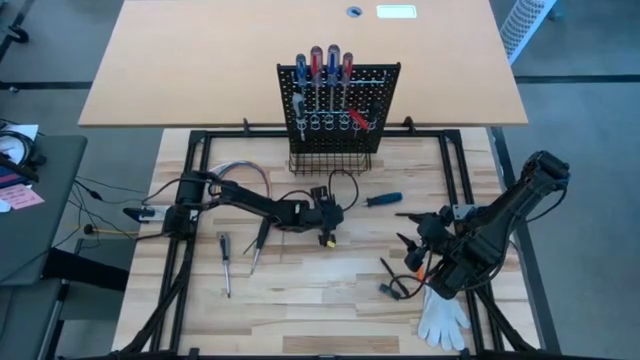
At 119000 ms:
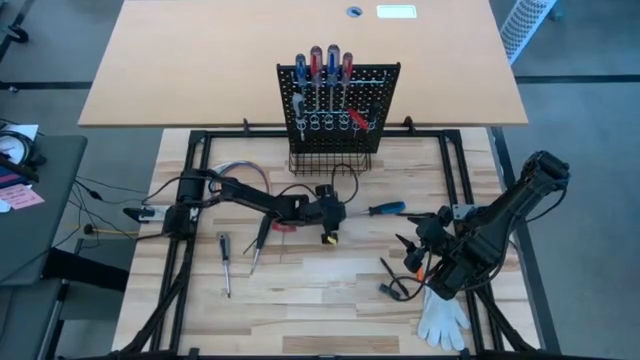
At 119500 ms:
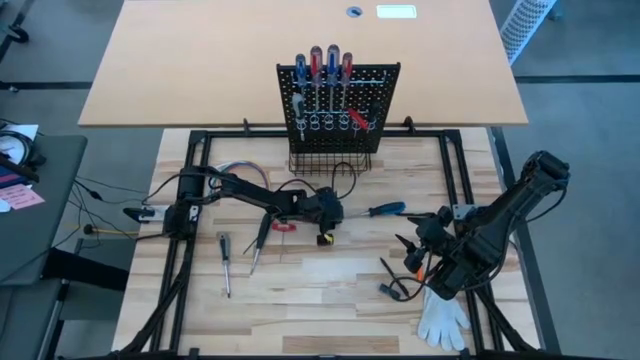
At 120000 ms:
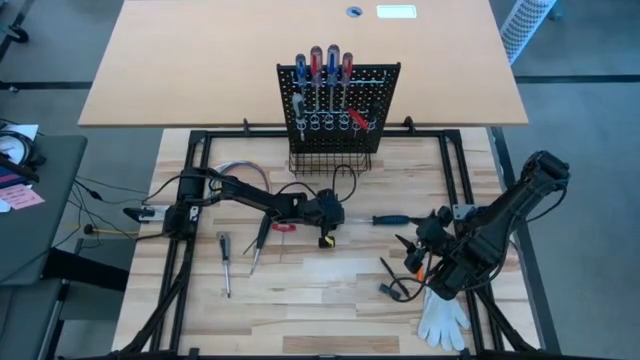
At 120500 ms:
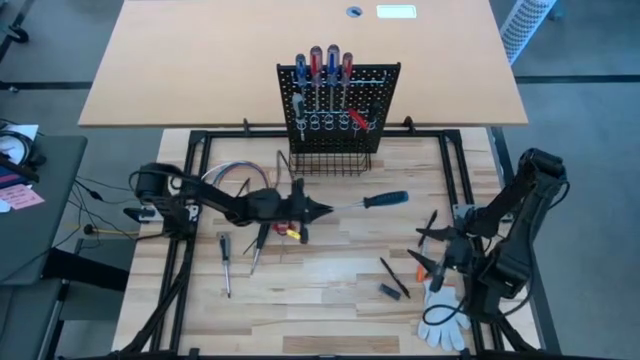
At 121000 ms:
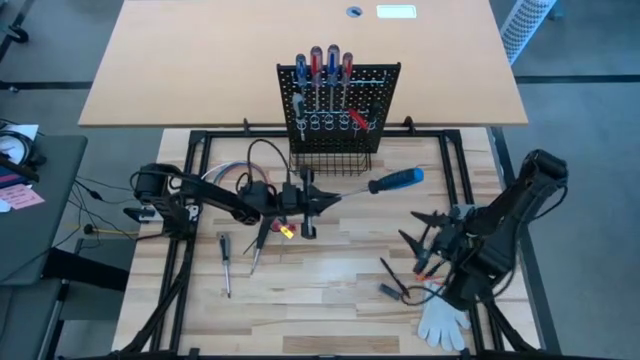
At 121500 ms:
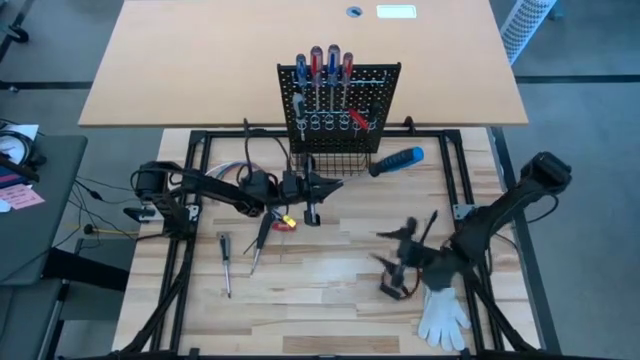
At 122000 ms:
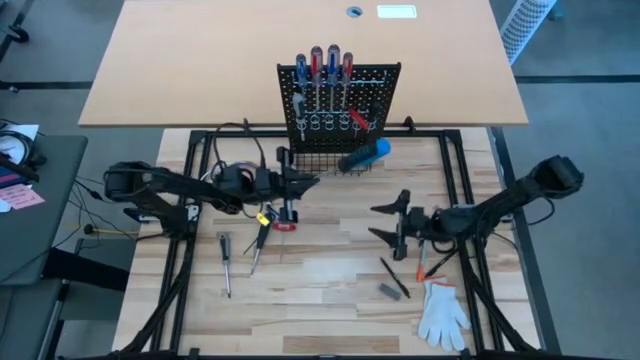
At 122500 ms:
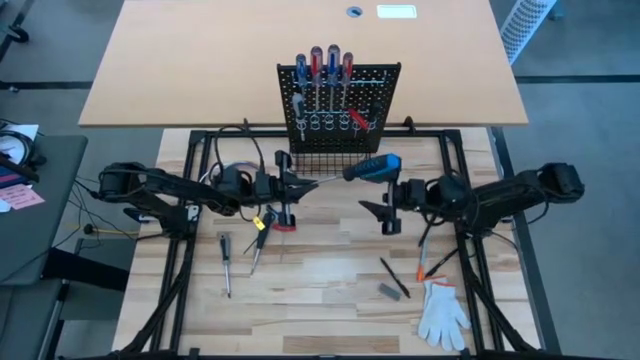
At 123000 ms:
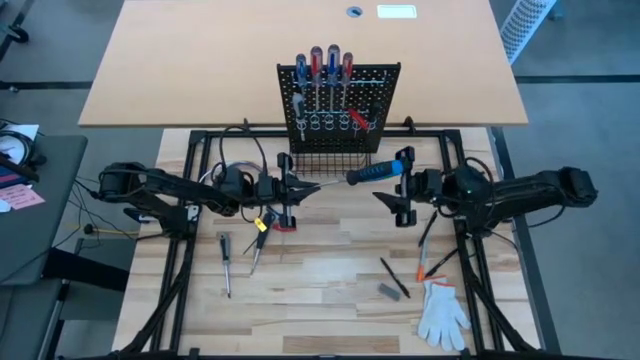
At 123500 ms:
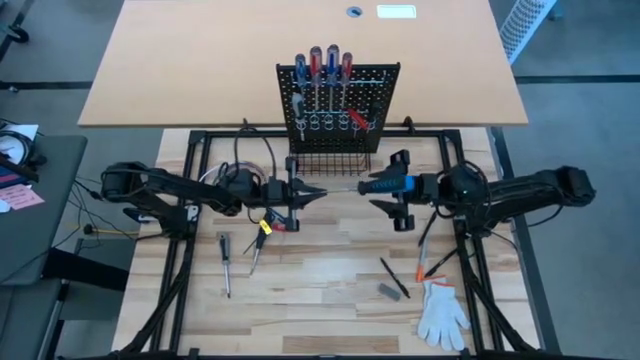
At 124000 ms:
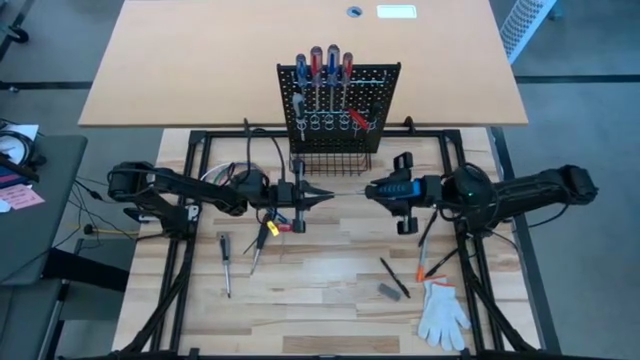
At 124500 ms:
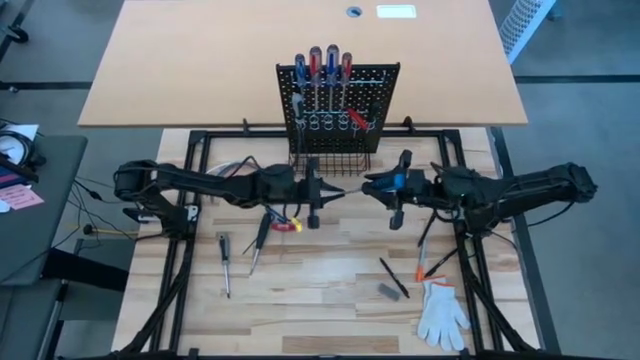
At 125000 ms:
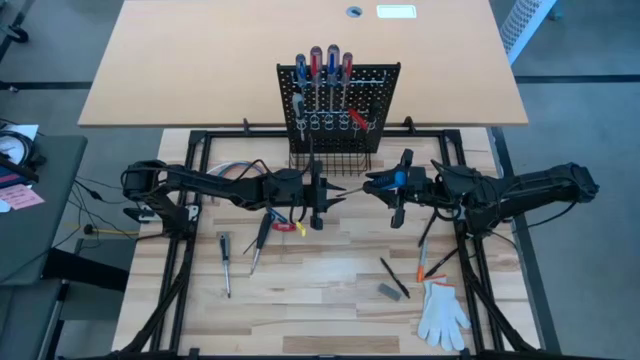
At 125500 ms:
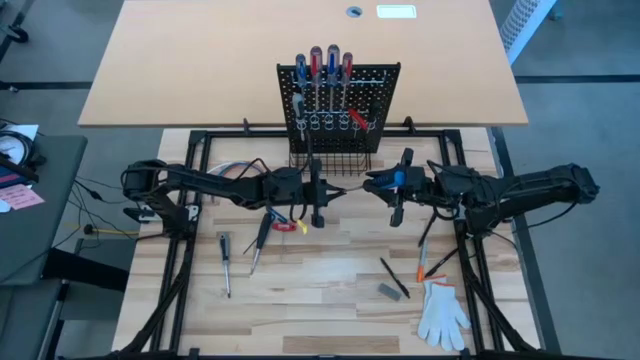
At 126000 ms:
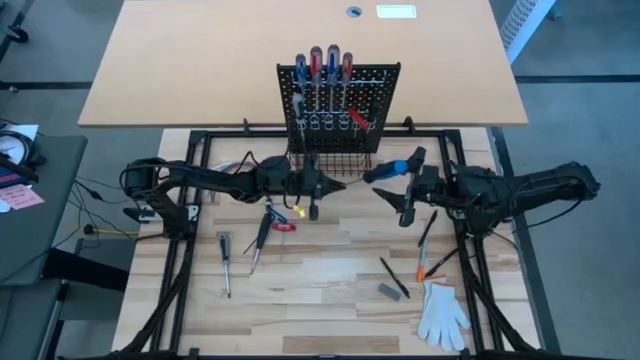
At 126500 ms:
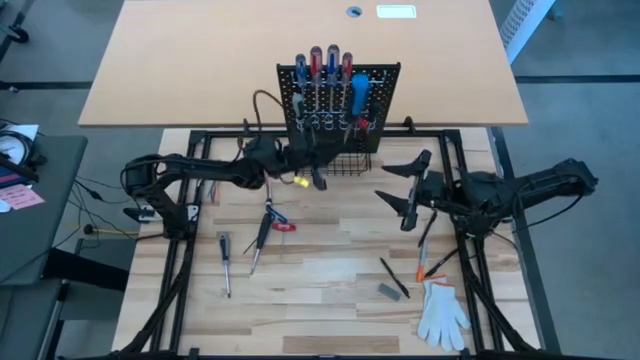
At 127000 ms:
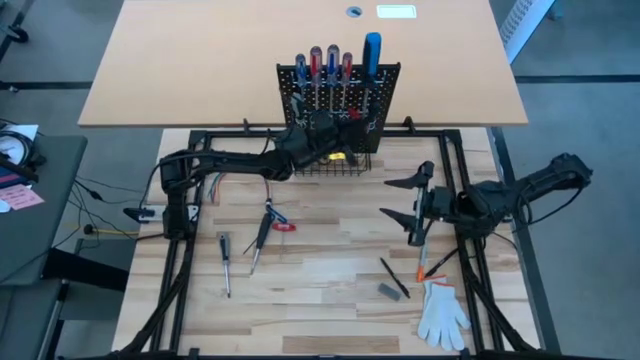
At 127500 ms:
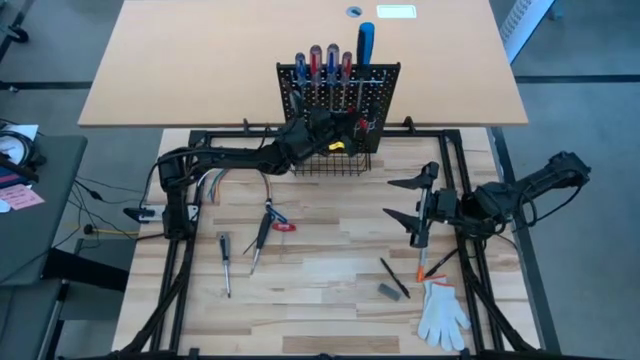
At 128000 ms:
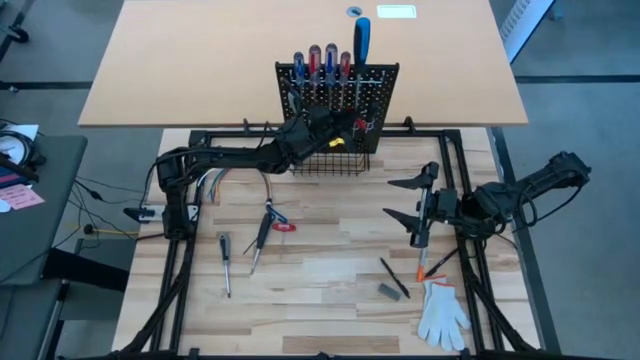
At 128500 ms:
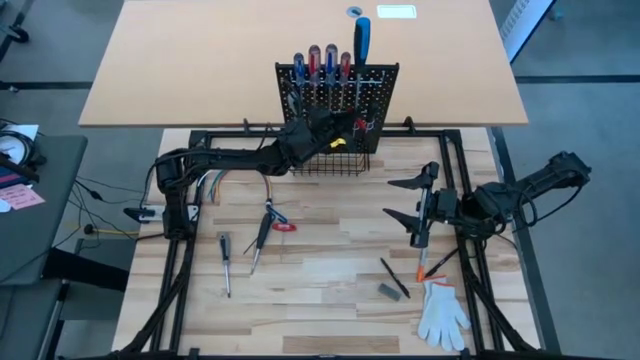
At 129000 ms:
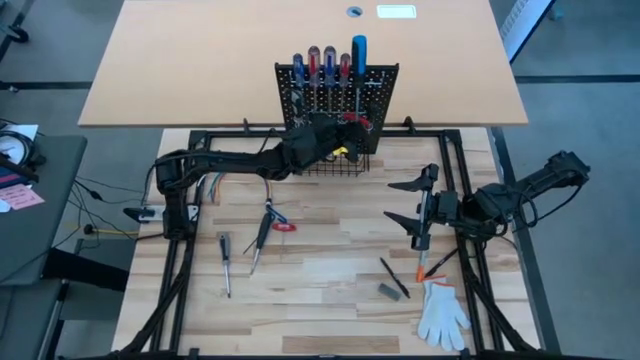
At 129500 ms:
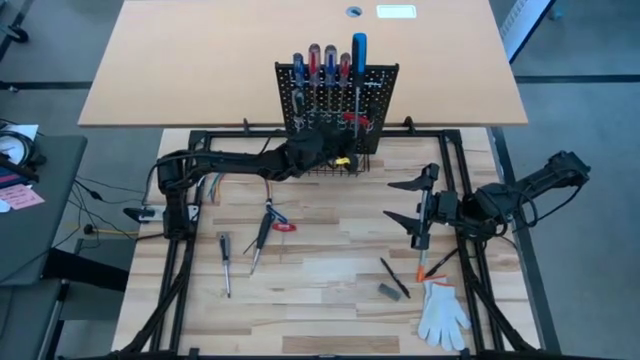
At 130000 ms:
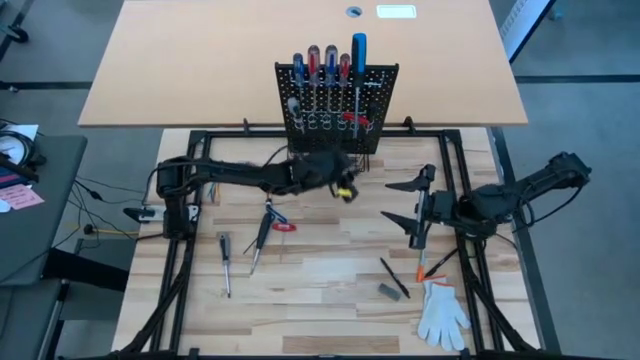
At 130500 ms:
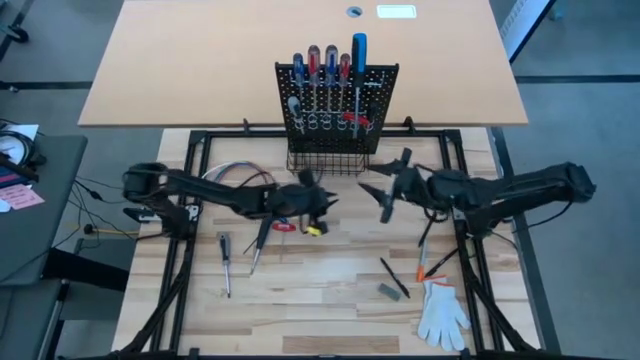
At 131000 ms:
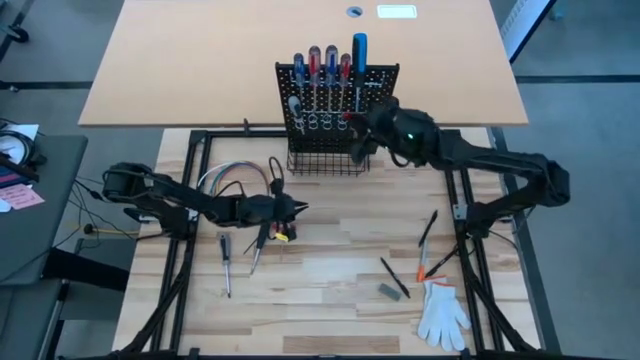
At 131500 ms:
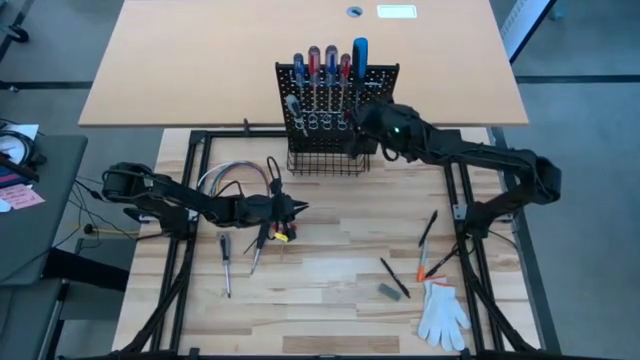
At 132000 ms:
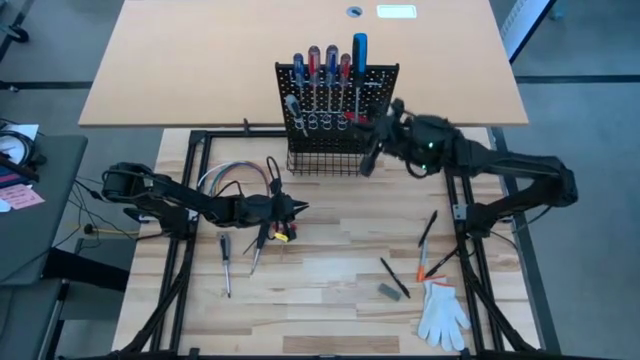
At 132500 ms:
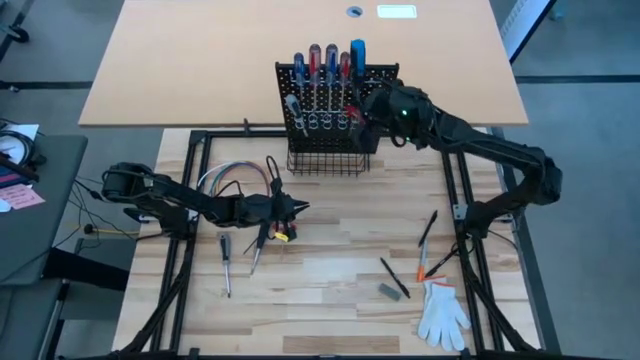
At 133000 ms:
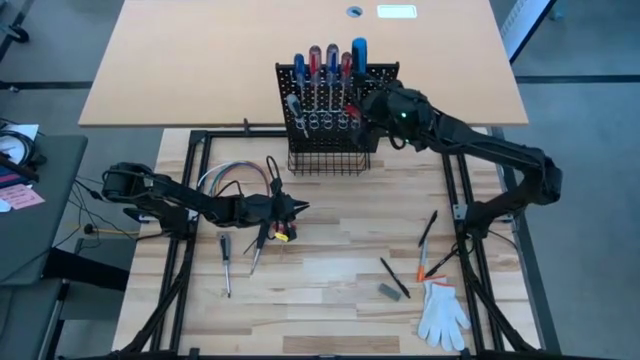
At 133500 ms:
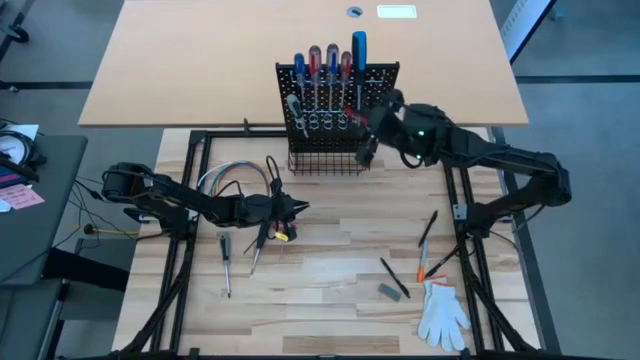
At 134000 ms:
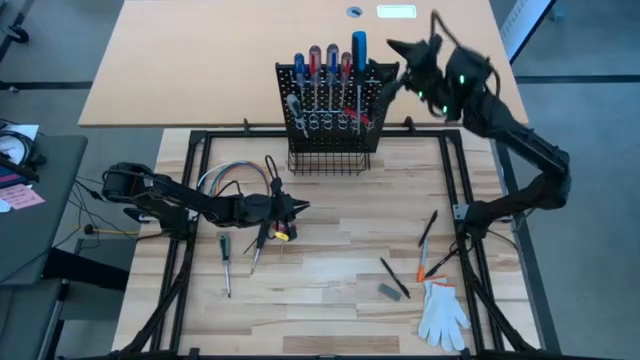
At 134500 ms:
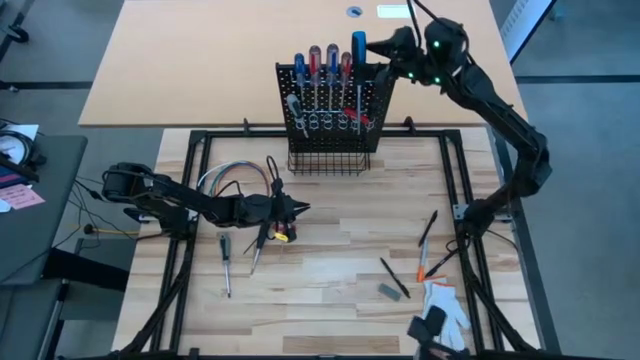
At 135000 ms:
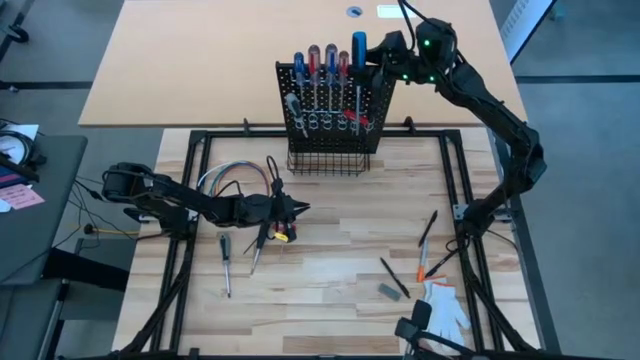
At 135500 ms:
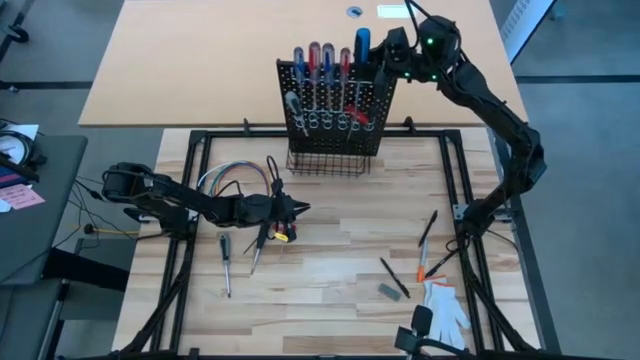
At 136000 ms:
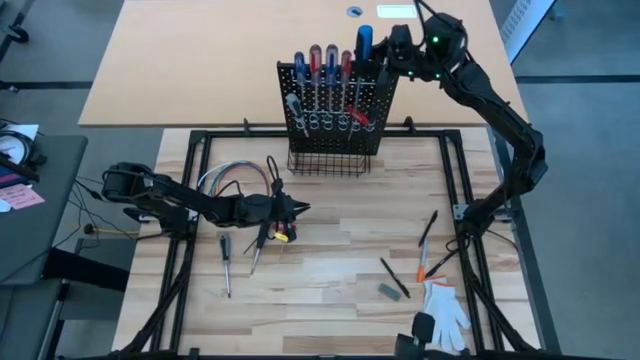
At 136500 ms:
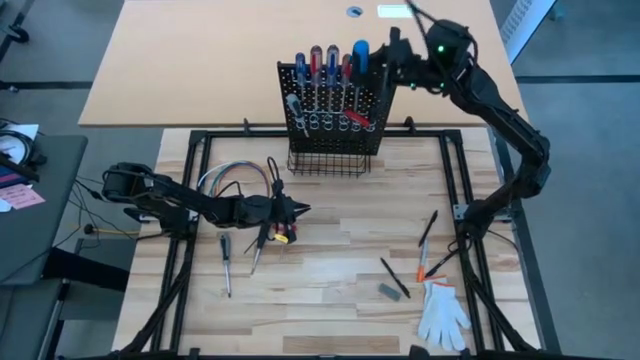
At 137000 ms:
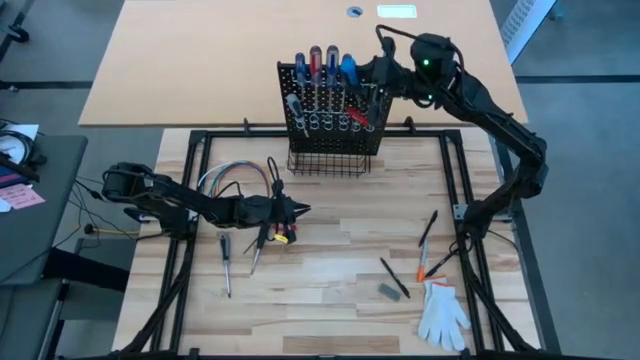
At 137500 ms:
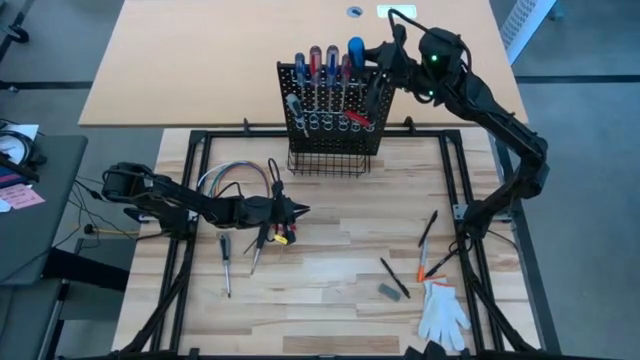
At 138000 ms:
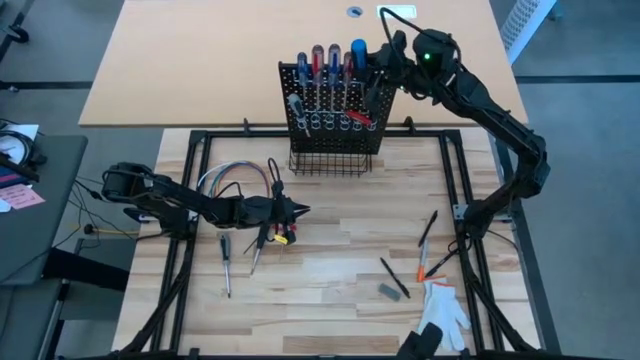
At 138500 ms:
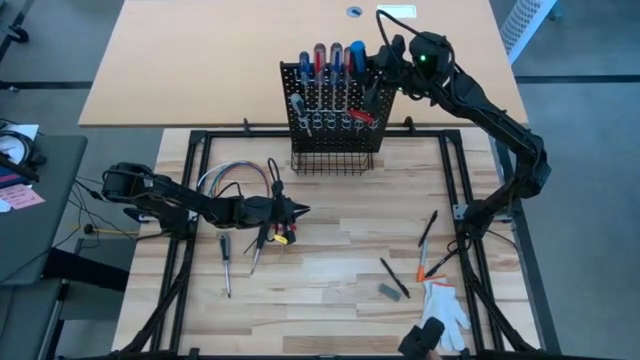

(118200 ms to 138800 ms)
Task: Hang tools onto peg board
Hang the black and blue screwdriver on the black peg board

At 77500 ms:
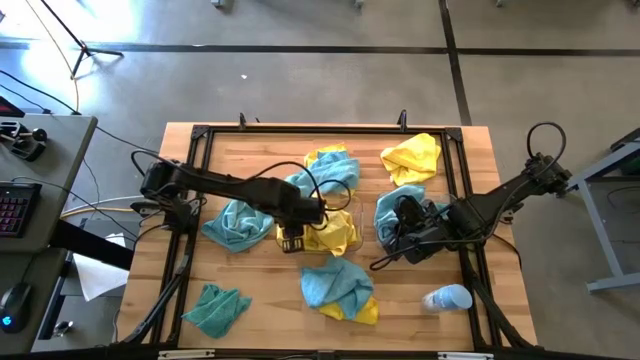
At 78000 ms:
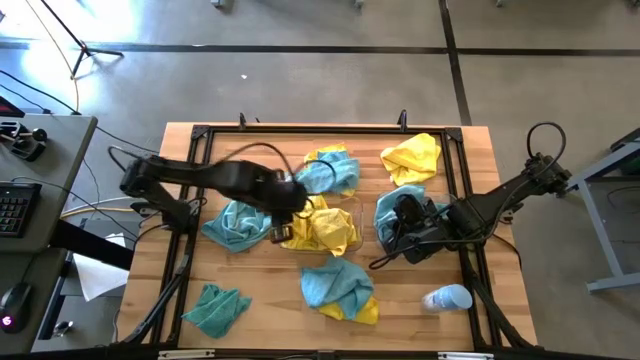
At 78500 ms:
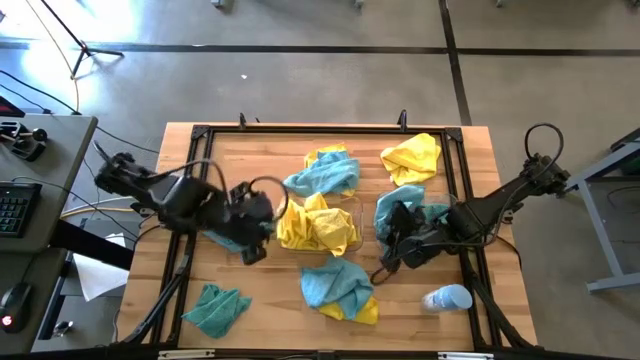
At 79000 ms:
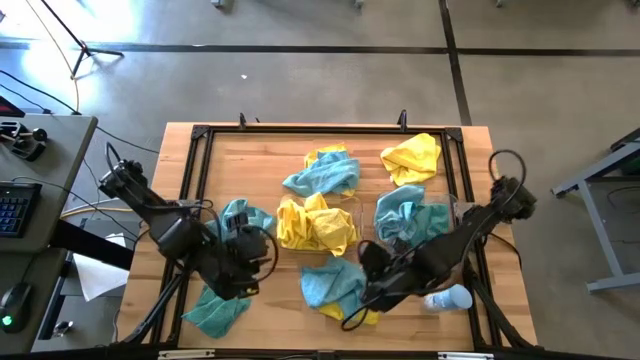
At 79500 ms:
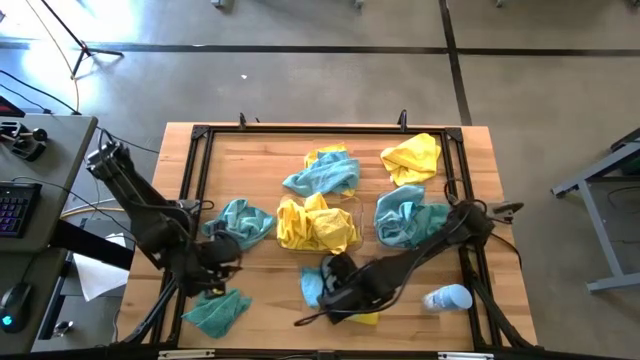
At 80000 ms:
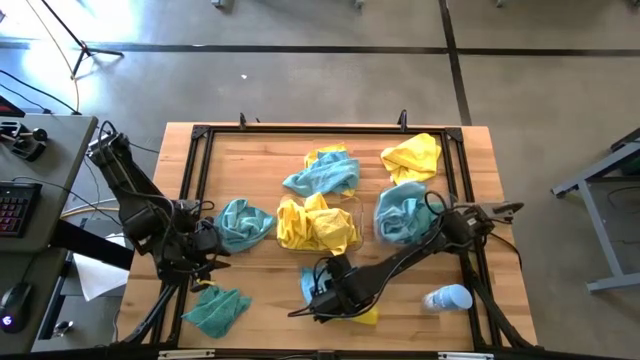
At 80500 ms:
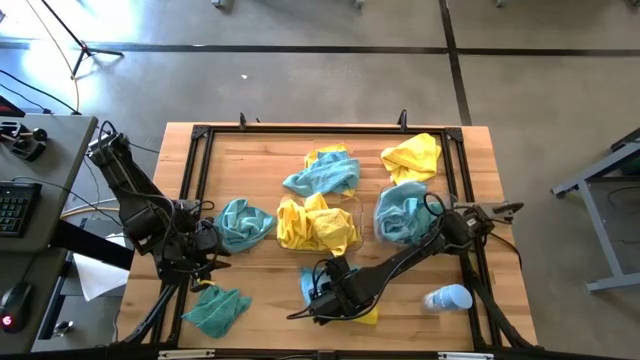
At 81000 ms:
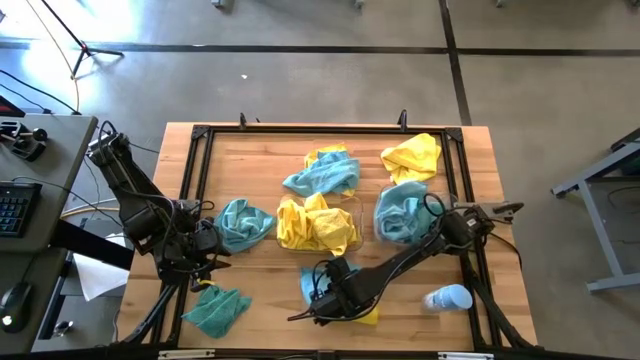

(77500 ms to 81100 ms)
Task: Sort microfiber towel by color & place in baskets
Put the blue microfiber cloth into the right transparent bin
